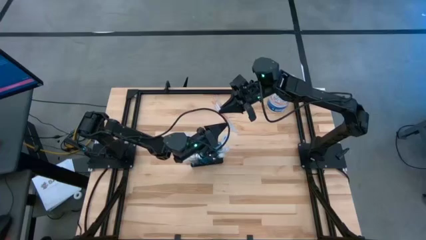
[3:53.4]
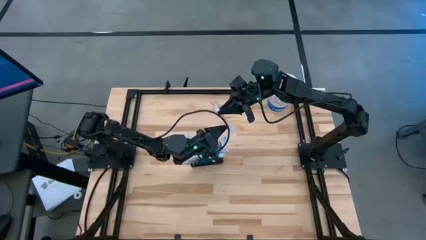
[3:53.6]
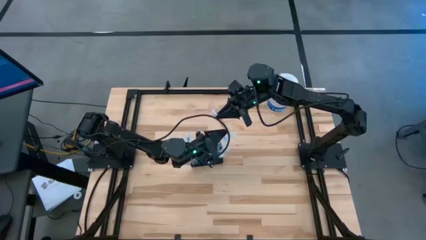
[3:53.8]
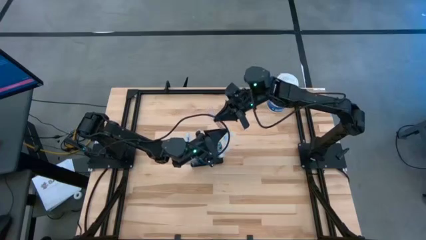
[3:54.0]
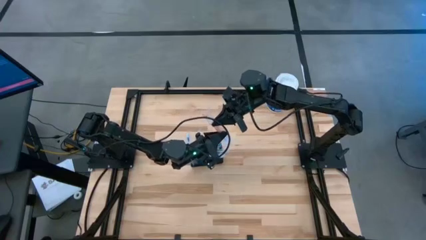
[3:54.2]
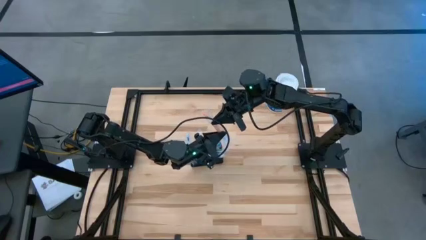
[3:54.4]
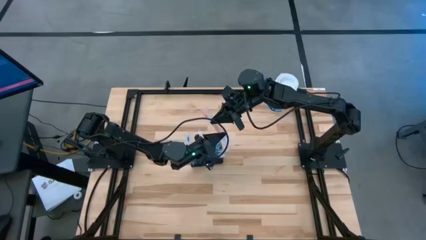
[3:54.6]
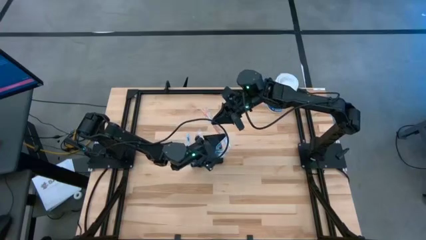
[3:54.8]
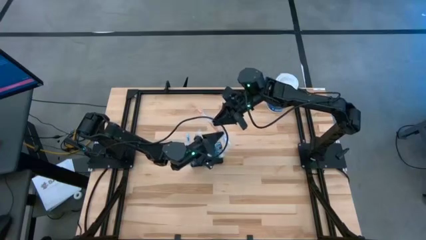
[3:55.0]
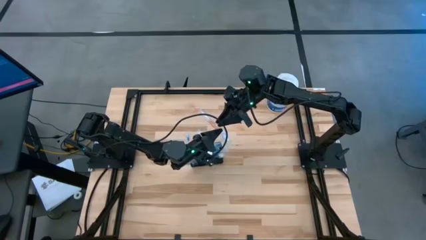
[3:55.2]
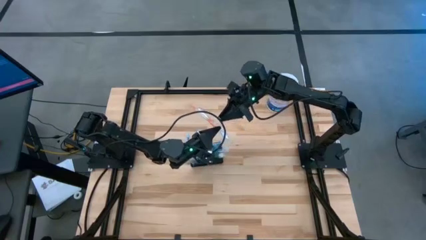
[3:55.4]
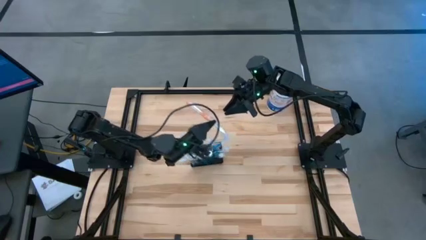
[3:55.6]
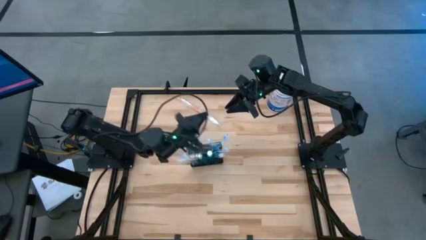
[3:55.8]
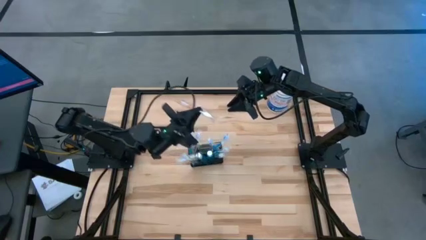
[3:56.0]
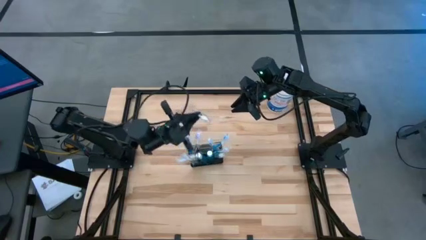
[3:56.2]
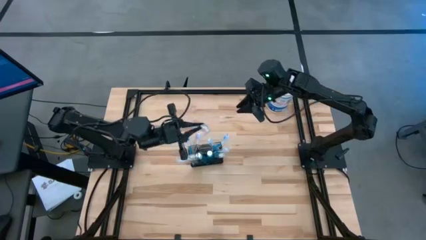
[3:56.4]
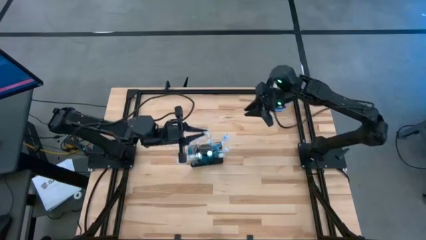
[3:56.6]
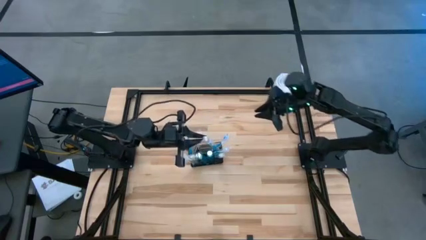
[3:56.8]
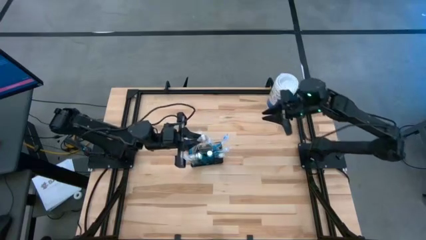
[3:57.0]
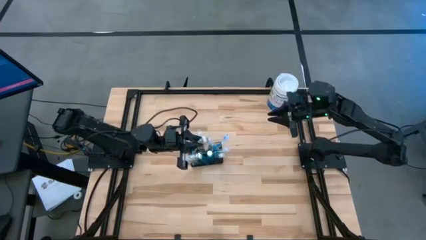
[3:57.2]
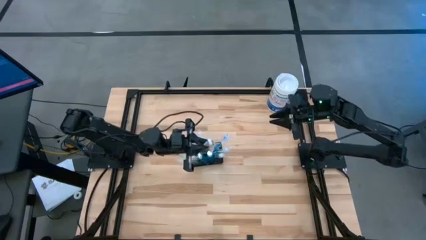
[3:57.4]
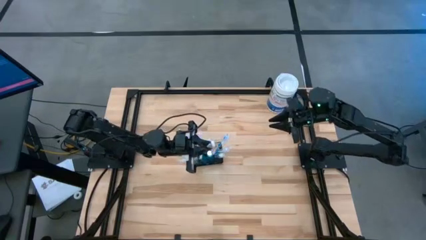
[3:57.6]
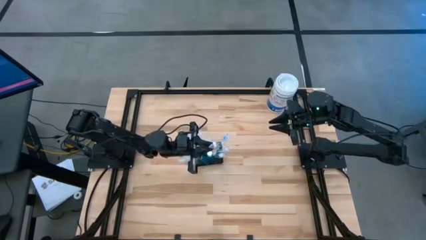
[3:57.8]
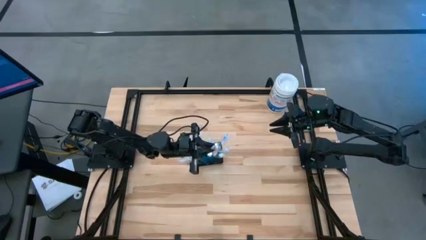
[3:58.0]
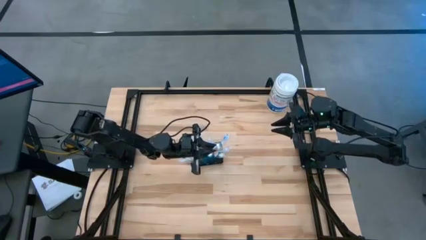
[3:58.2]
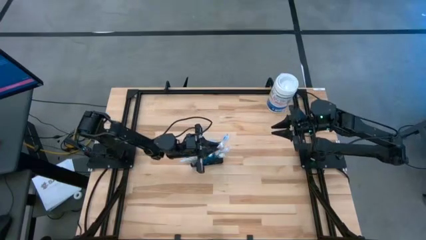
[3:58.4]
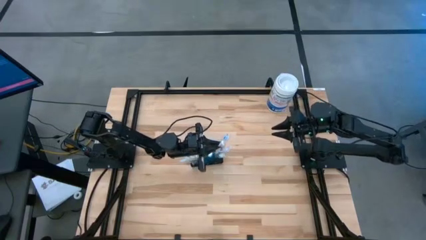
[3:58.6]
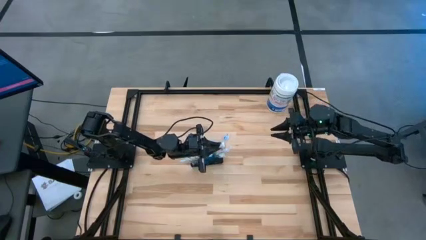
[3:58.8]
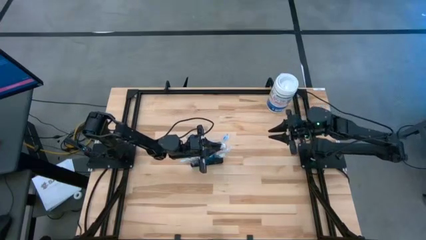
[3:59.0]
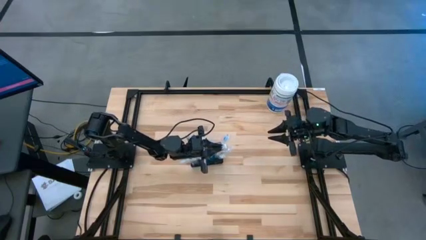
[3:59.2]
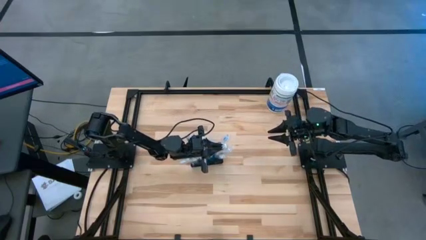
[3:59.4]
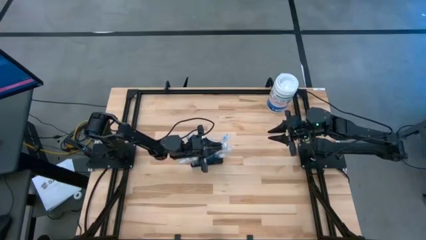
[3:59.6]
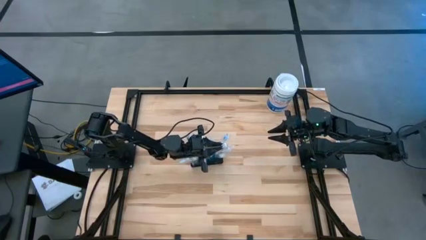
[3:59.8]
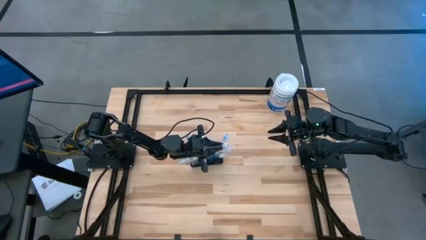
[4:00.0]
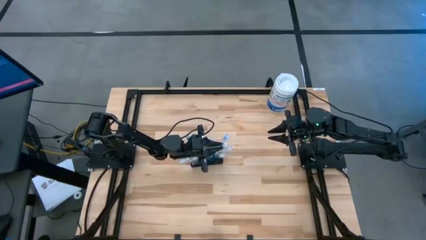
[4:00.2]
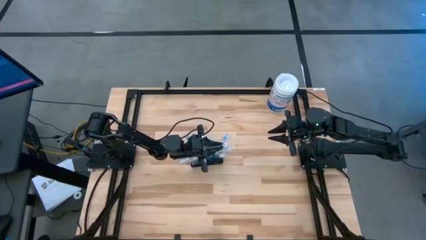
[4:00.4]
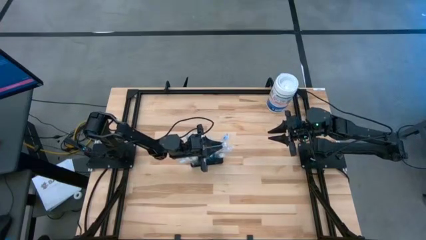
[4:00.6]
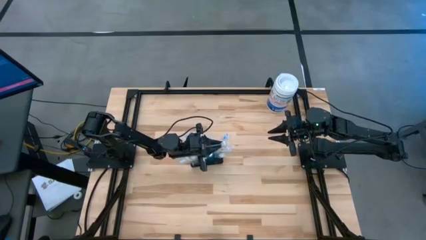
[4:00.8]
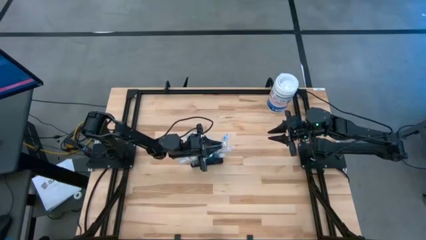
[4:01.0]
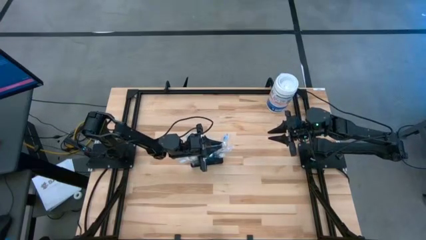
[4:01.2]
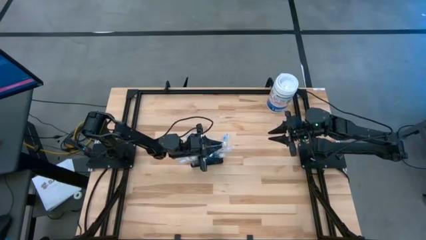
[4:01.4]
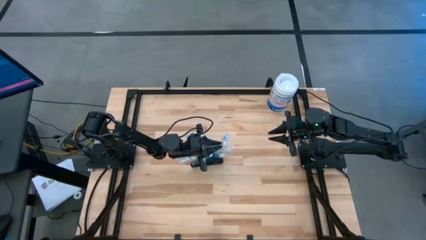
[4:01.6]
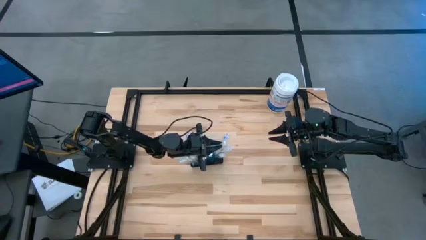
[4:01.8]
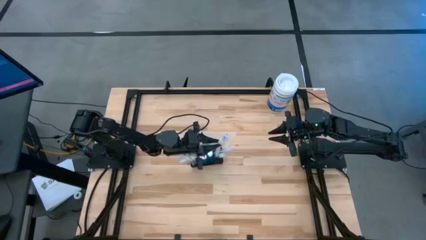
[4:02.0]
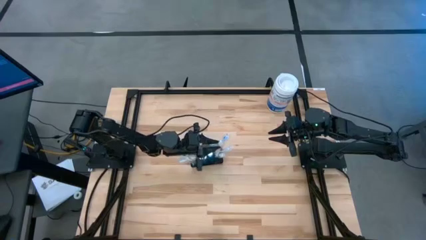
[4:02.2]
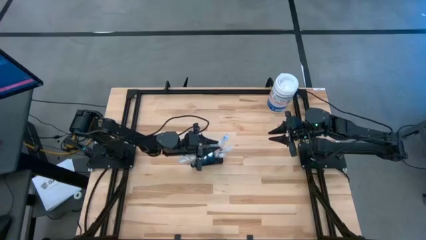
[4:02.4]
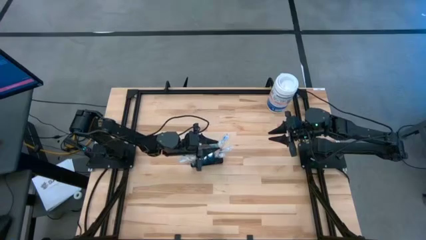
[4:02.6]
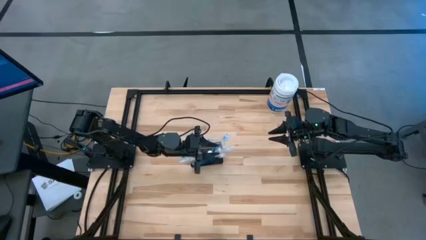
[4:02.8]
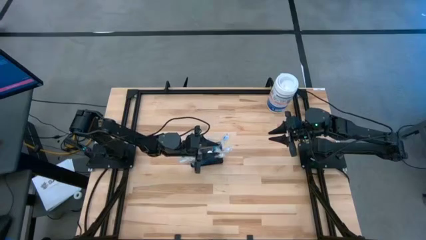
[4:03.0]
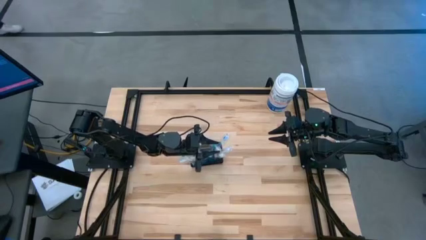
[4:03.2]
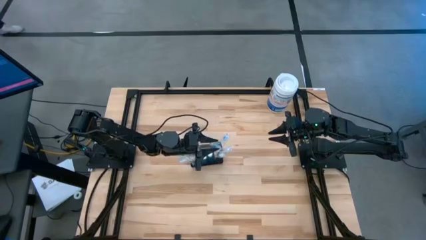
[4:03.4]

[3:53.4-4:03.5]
Task: Pick & Place toothbrushing station
Put the orange toothbrush into the wire organizer

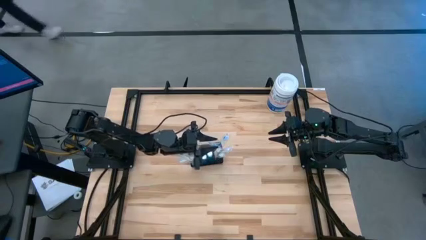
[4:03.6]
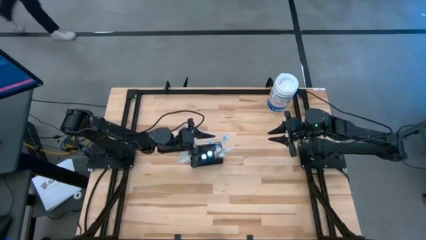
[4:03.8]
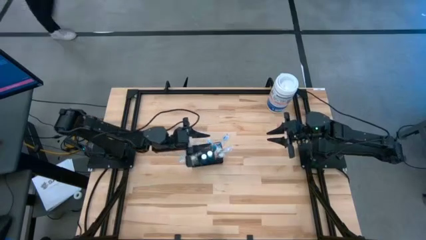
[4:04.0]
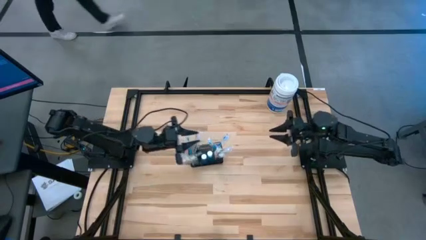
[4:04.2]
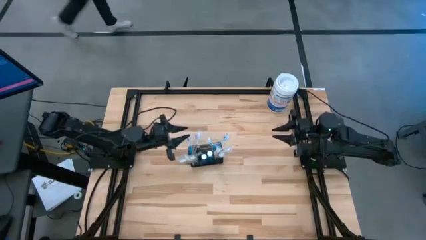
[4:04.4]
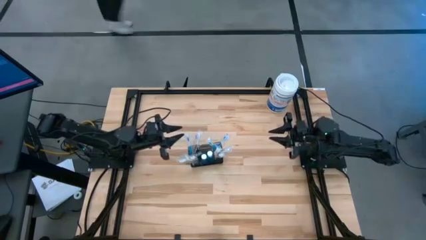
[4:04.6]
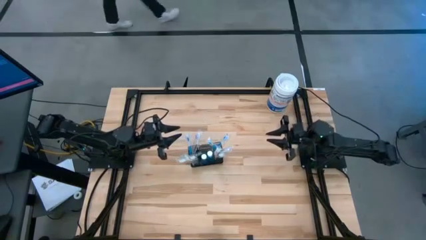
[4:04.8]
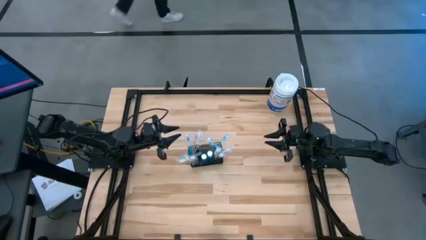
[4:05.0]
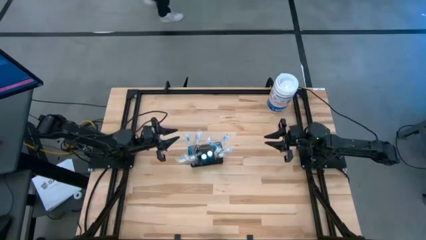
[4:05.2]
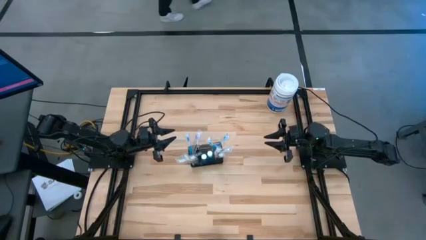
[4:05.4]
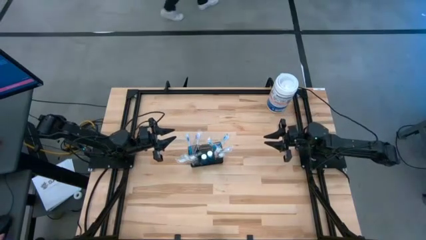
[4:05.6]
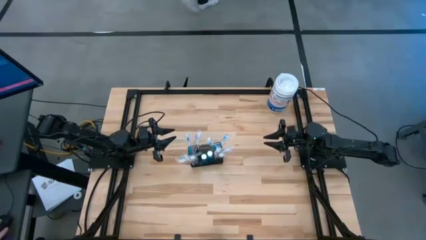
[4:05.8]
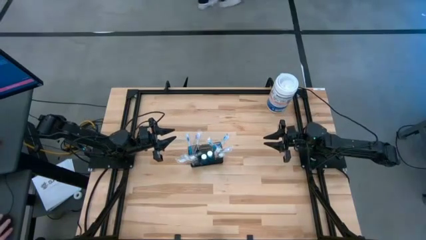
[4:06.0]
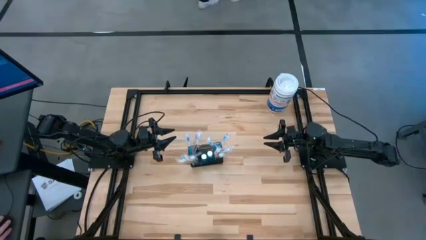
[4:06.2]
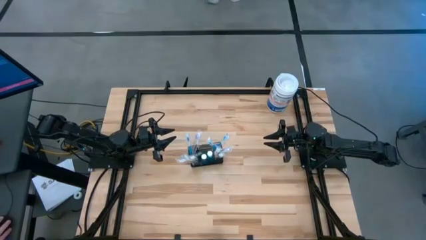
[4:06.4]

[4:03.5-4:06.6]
Return to Home Position

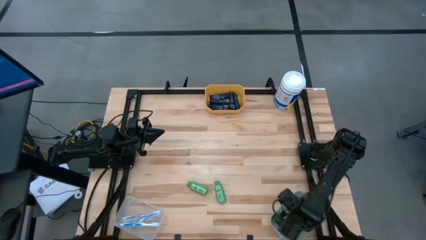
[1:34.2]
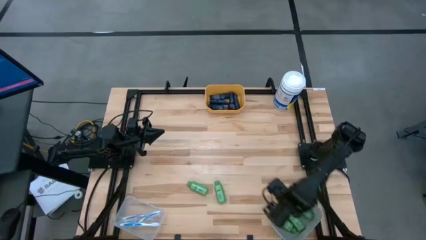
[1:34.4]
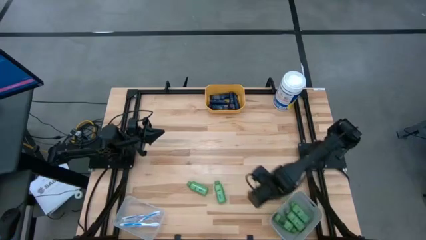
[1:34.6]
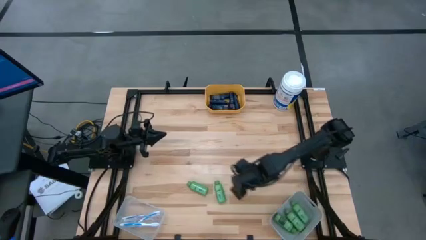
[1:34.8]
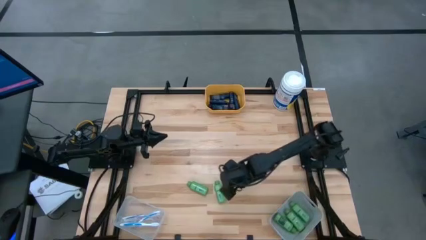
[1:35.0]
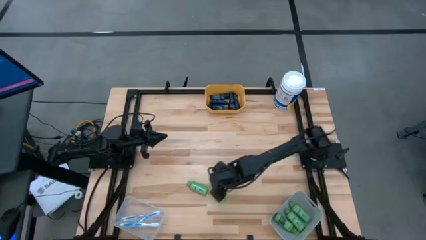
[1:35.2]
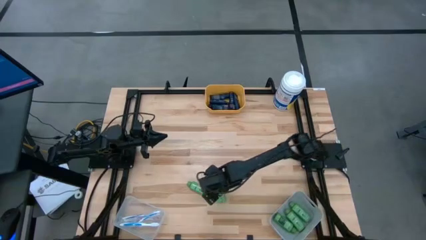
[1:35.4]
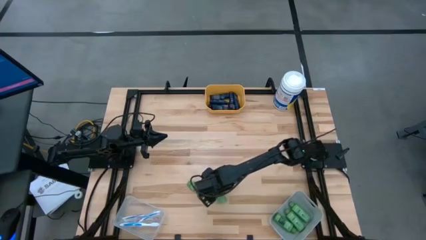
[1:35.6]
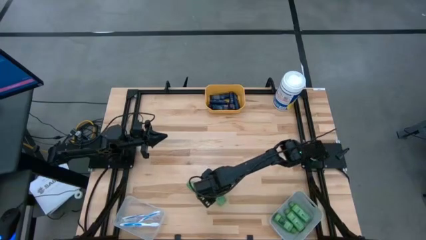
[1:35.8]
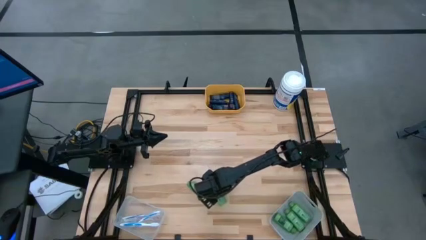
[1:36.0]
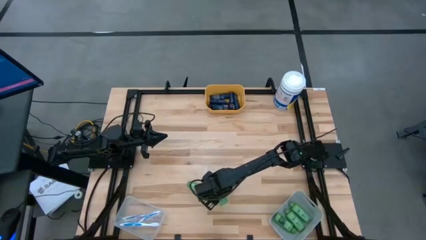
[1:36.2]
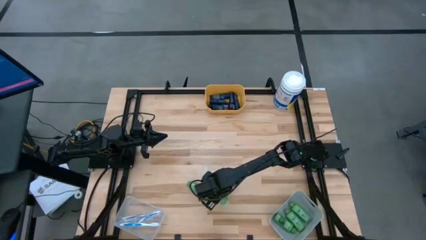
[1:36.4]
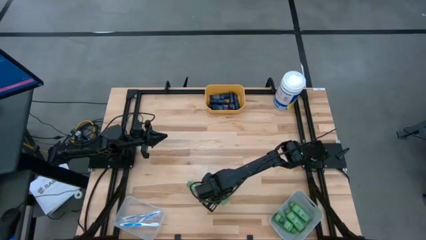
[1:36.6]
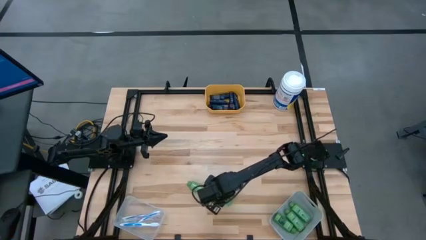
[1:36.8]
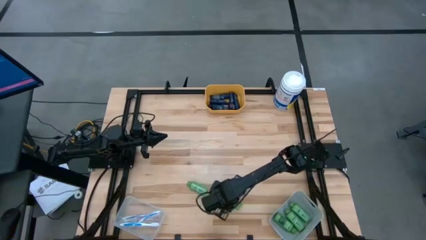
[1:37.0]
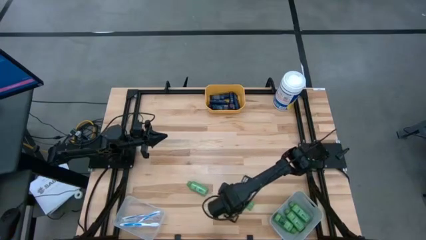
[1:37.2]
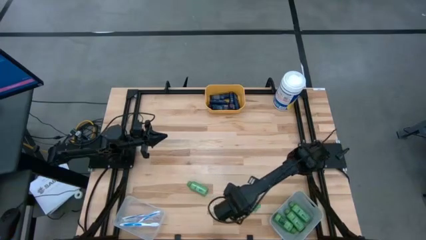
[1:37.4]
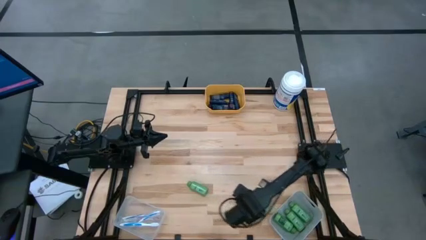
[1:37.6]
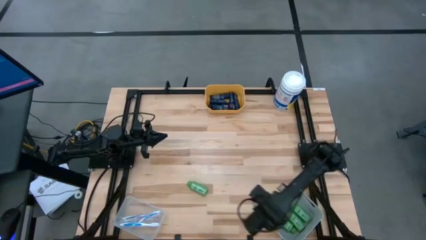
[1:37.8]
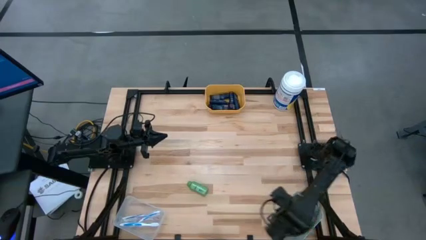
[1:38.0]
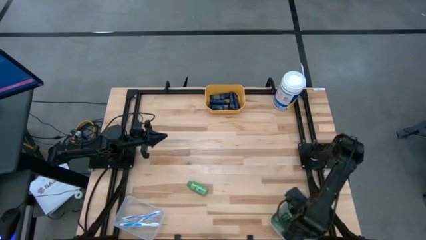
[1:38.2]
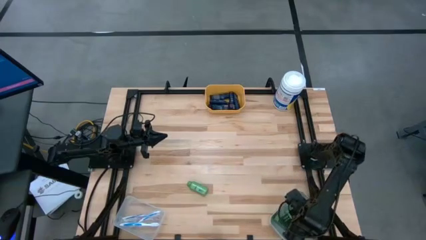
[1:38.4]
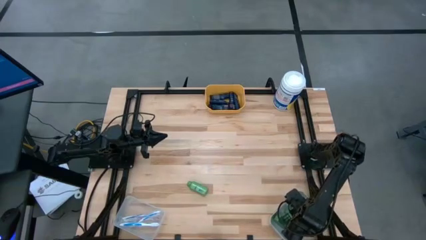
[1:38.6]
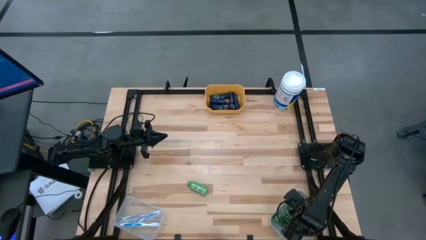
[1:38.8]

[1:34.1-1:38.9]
Task: Pick & Place Travel size toiletries
Put the shampoo into the white bin
